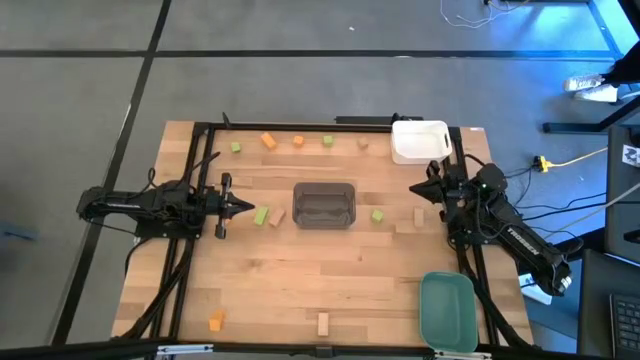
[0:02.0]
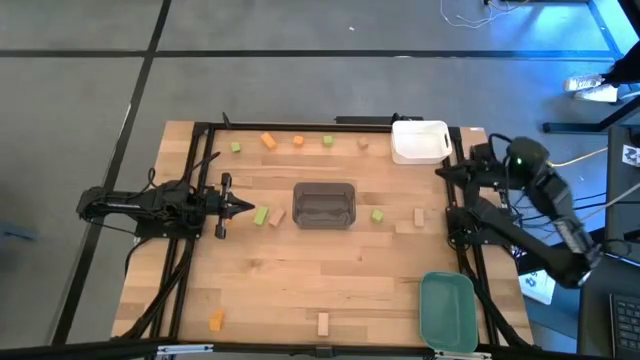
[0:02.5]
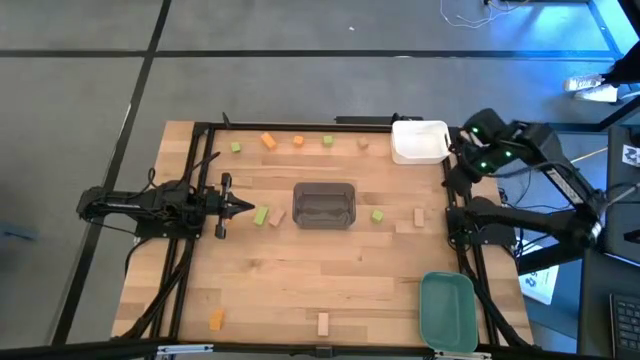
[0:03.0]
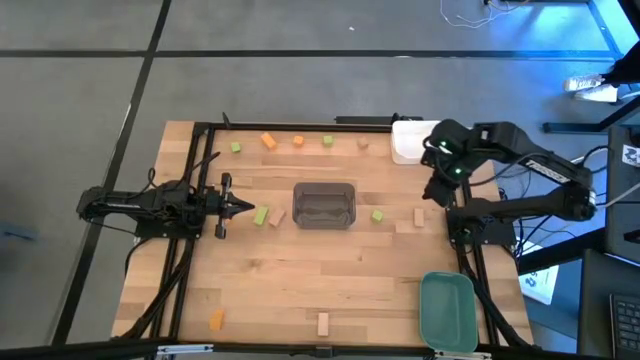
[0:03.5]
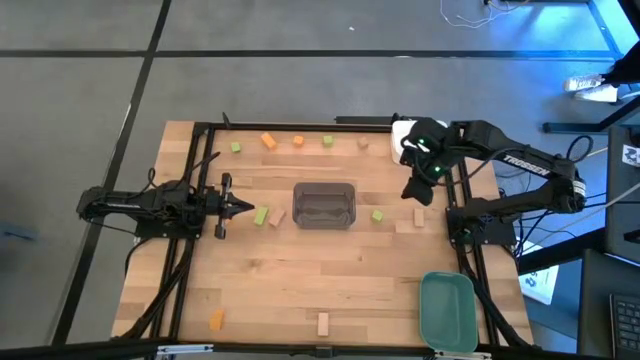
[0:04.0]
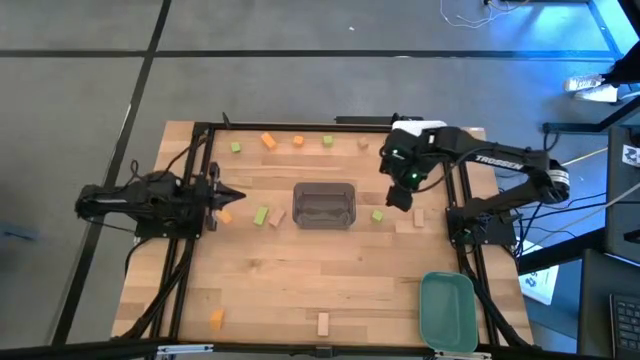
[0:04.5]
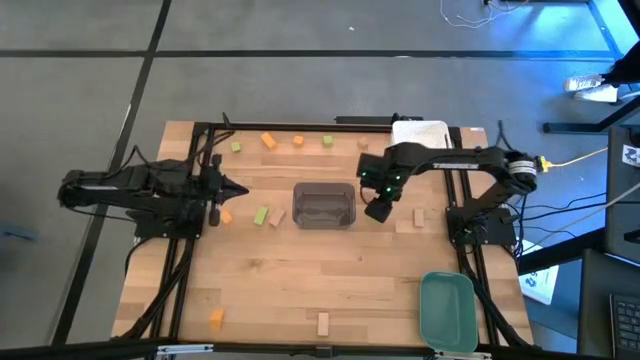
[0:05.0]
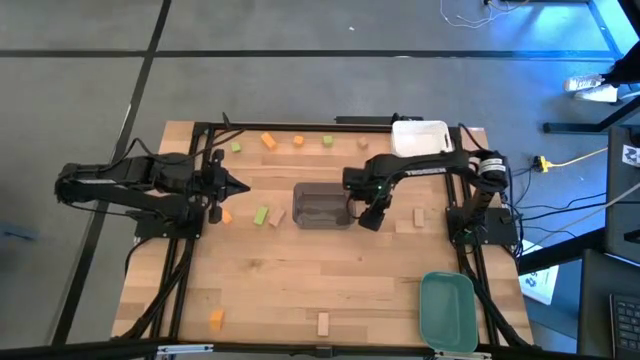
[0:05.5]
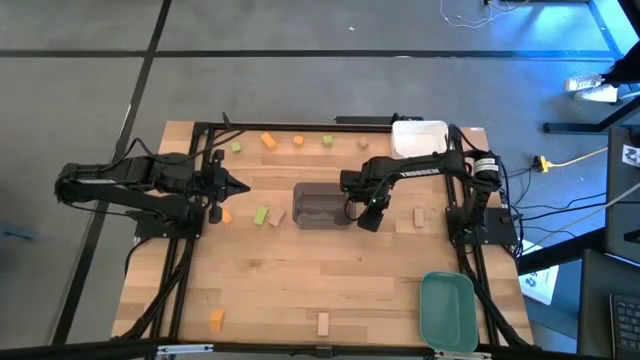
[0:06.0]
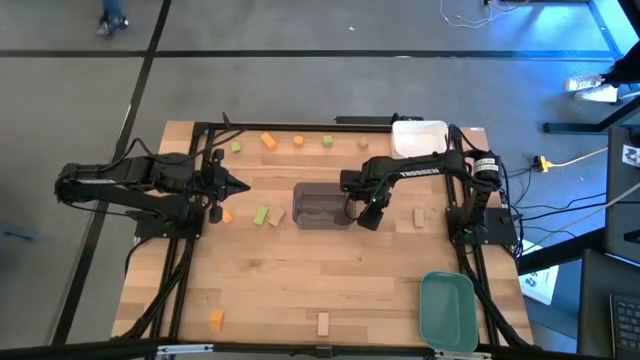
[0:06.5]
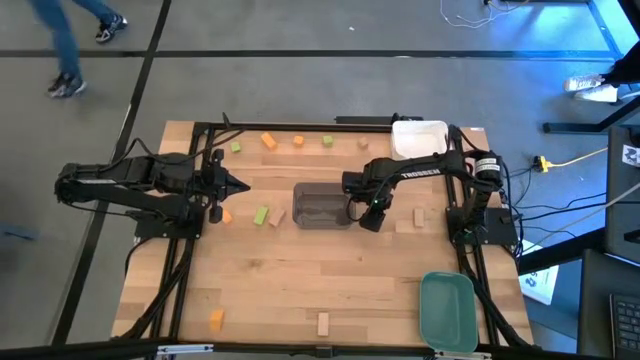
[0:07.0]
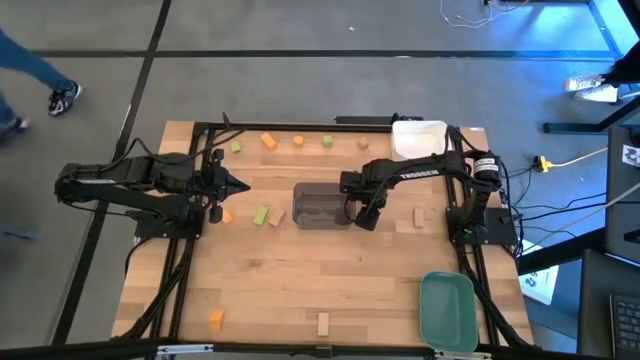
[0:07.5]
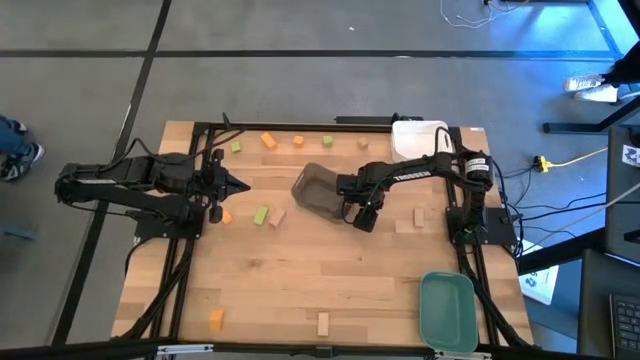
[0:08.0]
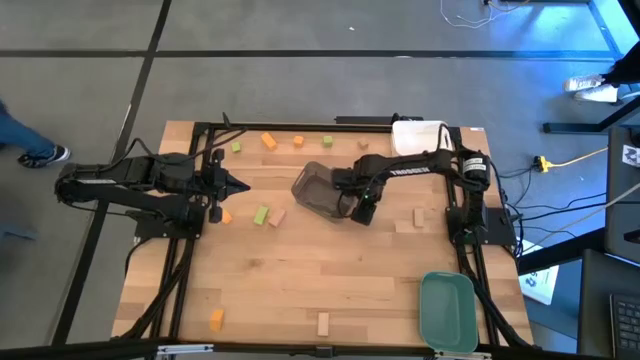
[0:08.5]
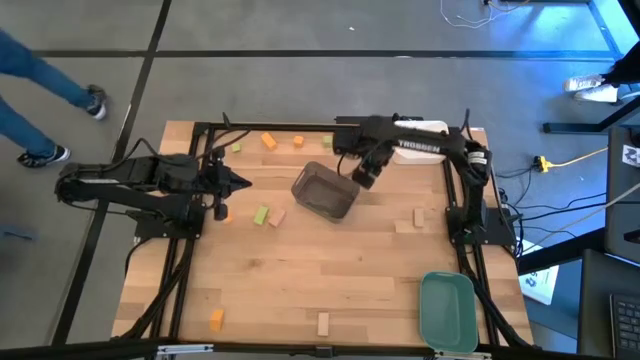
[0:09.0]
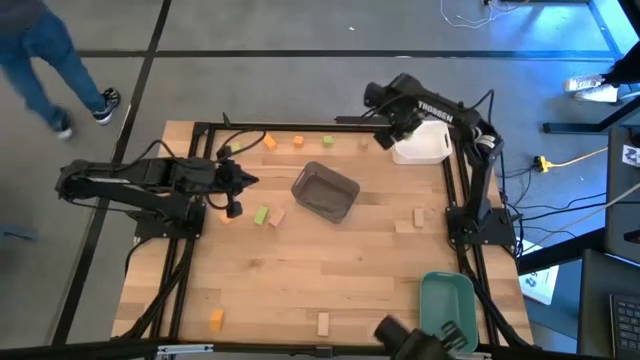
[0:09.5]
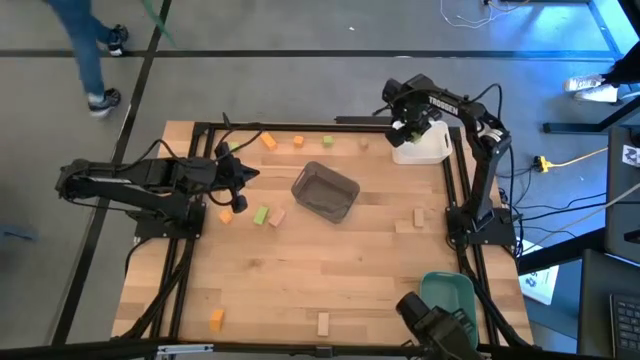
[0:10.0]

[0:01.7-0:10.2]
Task: Sort & place blocks by color
Put the green block into the white bin

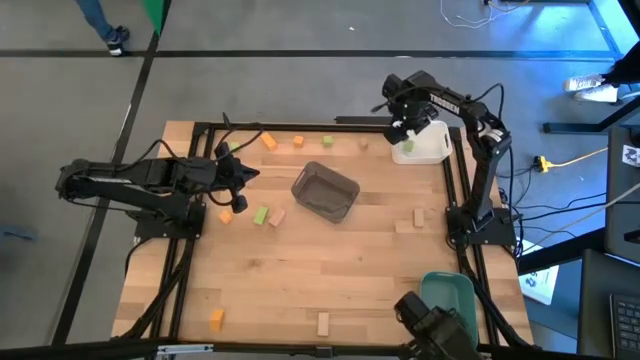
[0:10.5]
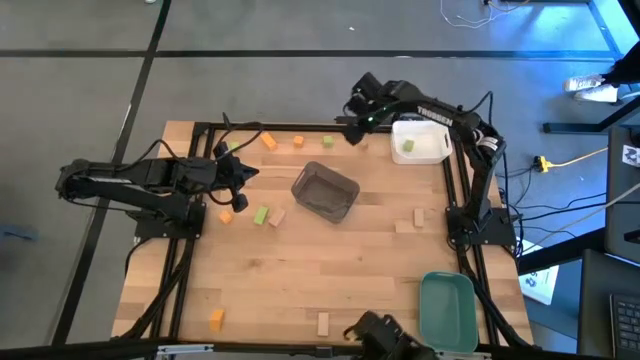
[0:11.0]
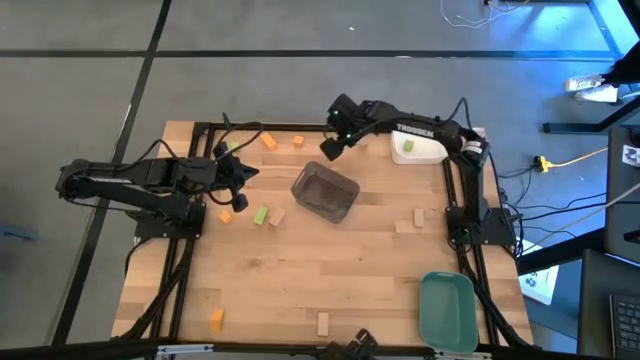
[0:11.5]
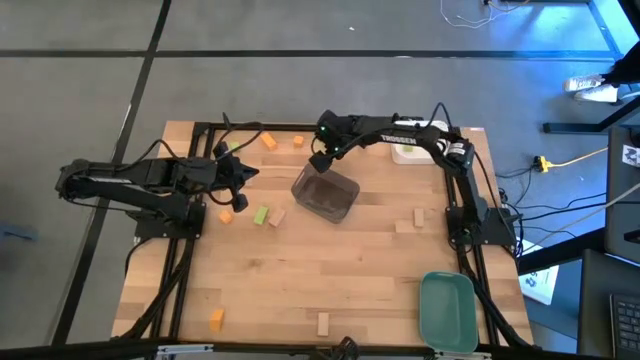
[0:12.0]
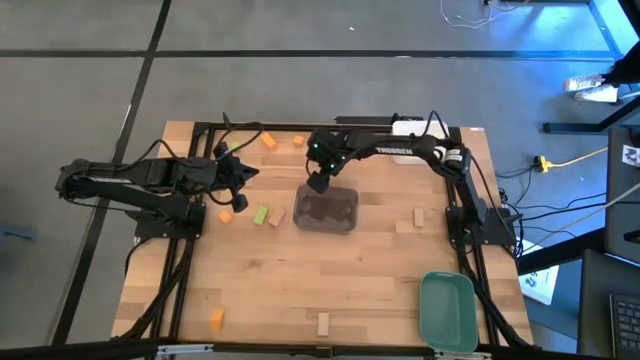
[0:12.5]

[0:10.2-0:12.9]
Adjust the black bin

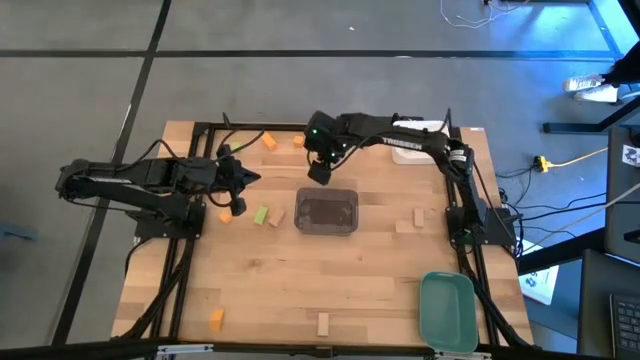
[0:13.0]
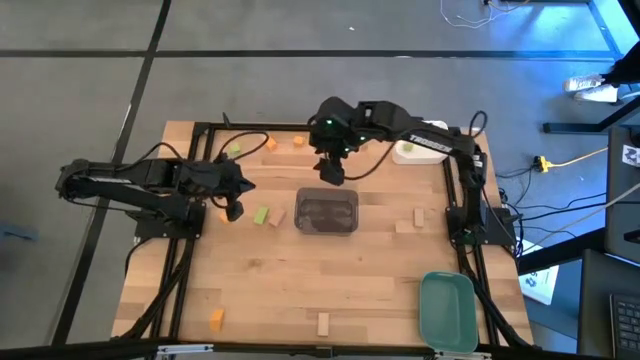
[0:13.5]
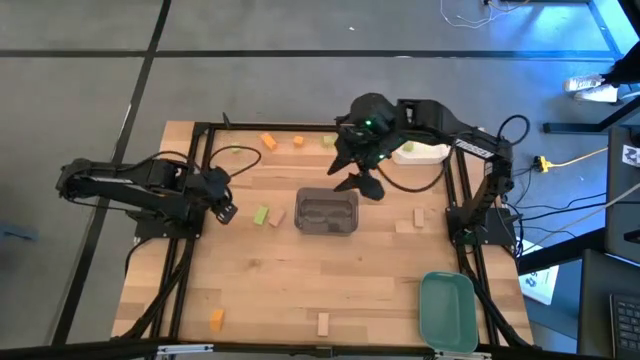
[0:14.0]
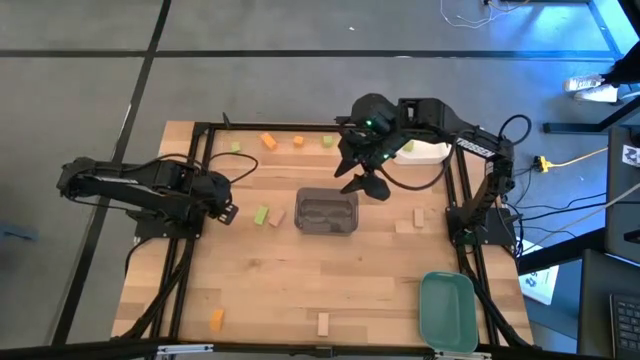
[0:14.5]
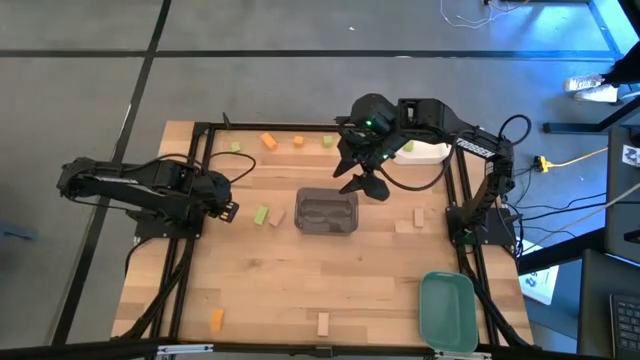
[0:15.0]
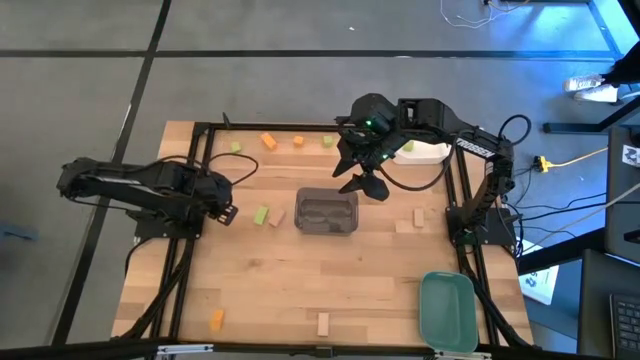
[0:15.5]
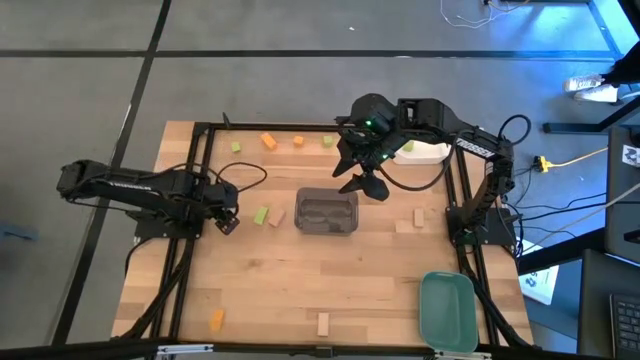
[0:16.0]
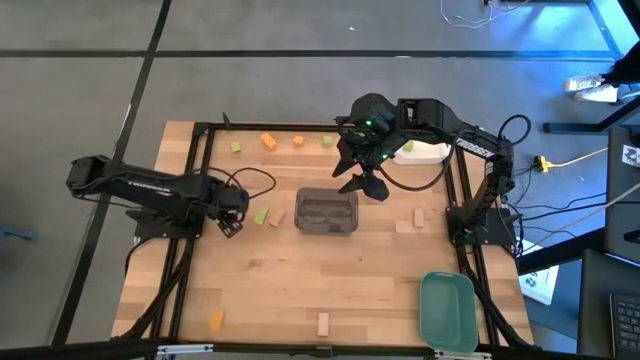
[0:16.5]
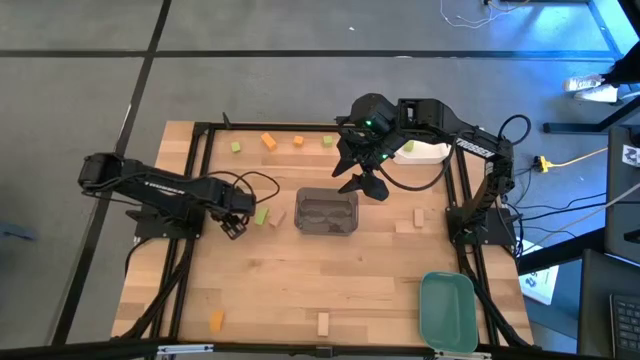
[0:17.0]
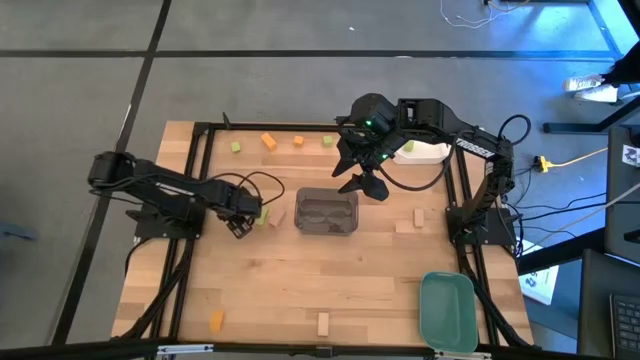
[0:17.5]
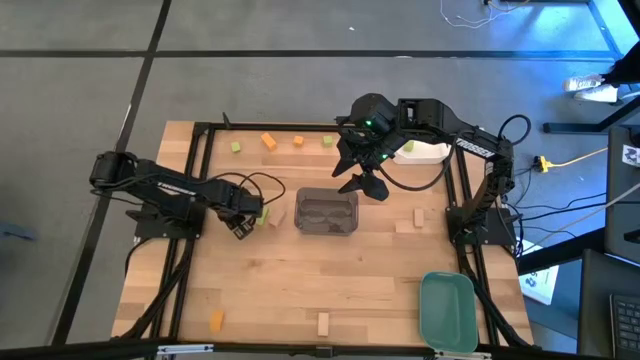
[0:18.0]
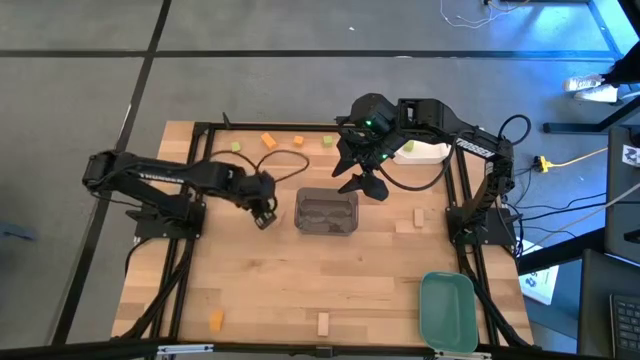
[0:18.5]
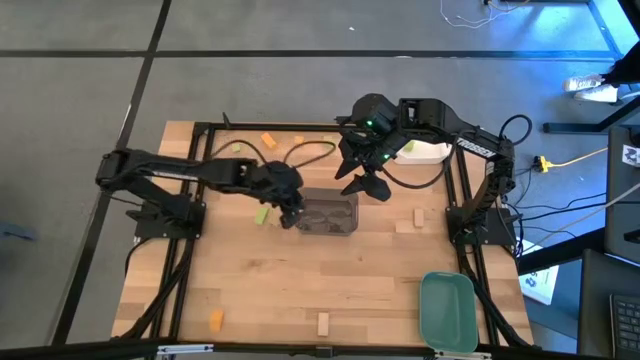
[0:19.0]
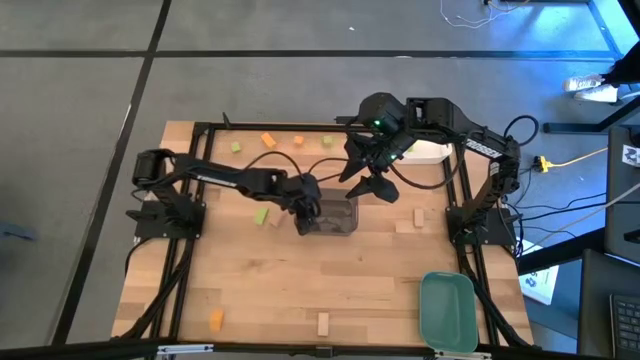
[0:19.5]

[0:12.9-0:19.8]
Put the orange block into the black bin

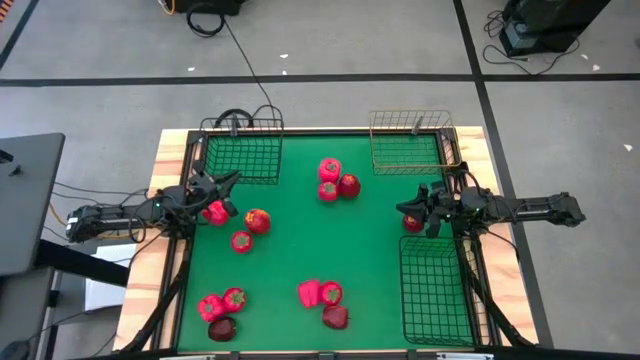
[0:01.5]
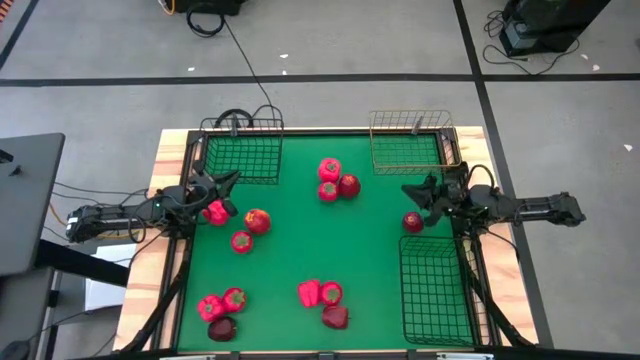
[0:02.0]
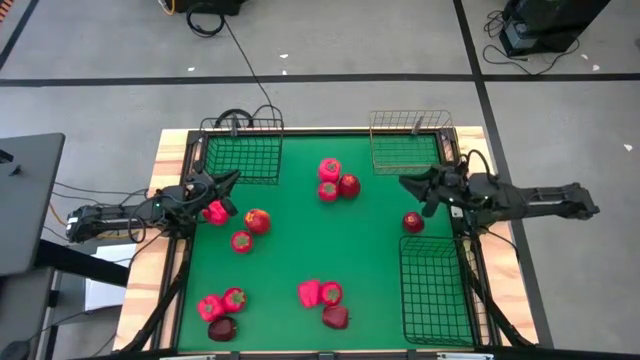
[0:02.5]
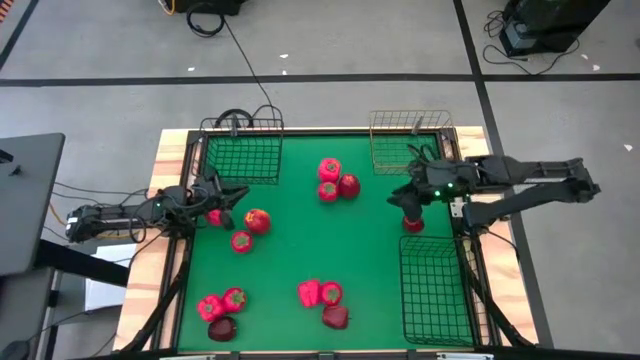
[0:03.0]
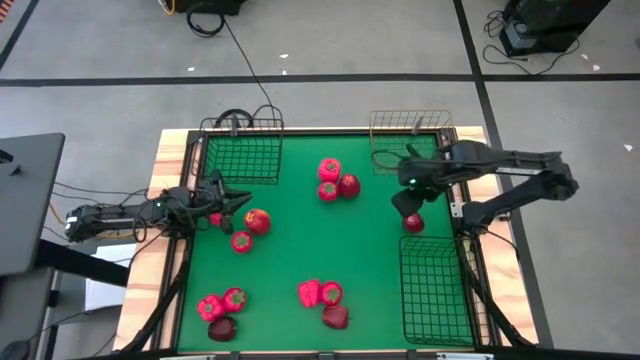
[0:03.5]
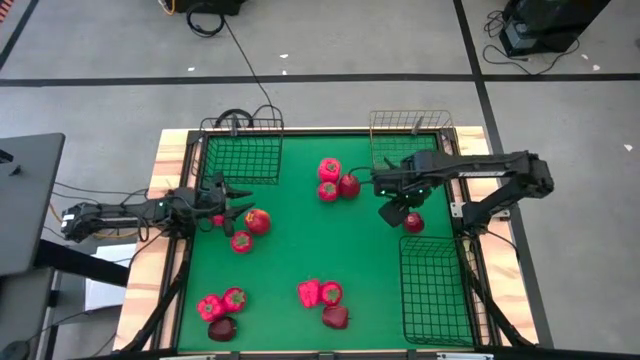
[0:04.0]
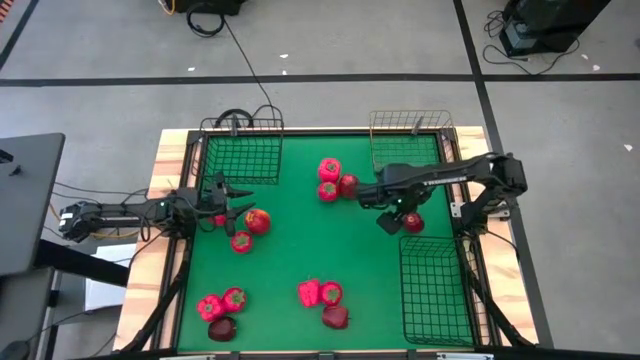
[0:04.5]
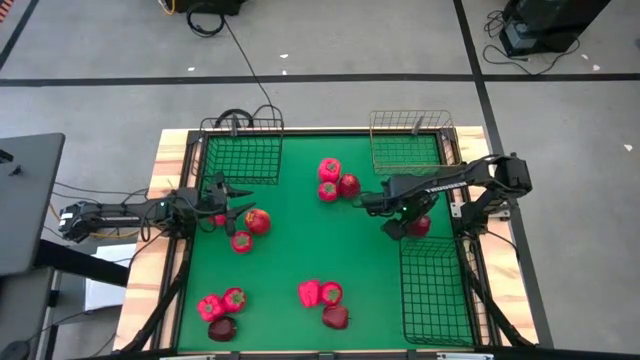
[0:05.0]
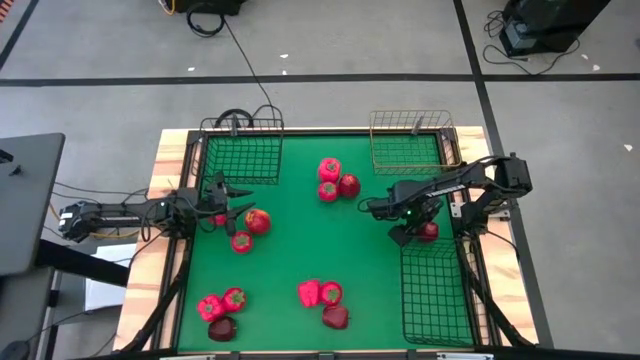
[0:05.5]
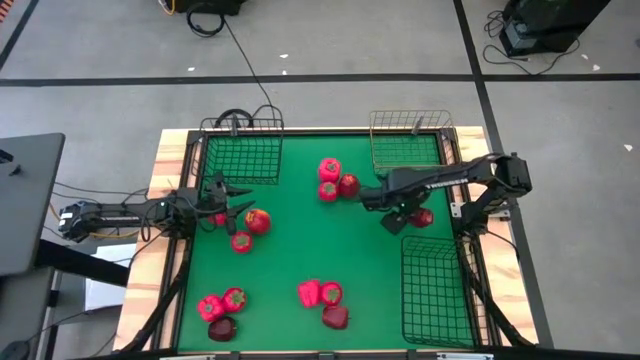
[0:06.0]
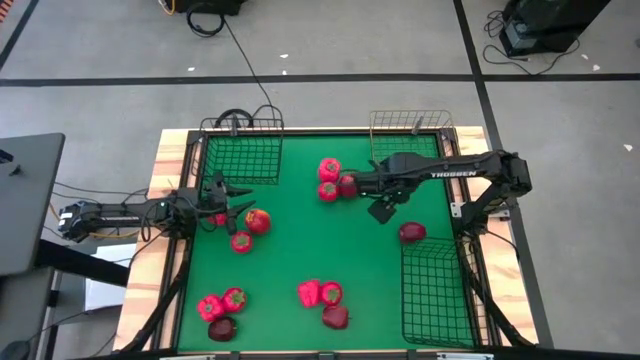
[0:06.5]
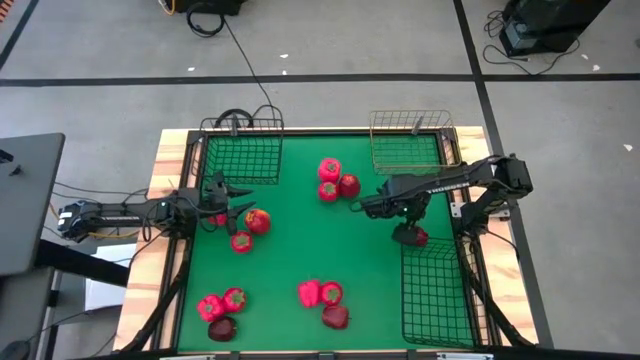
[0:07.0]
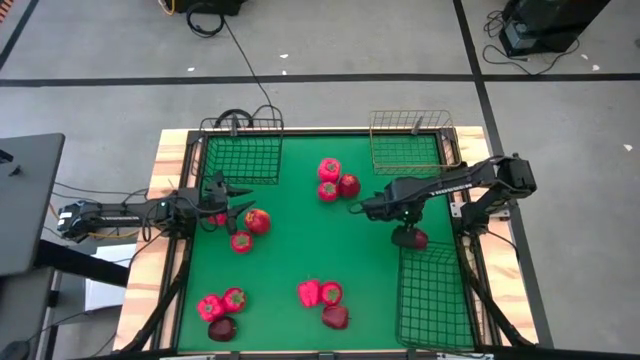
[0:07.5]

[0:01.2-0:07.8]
Task: Sort produce into baskets
Put the red apple into the gold wire basket
